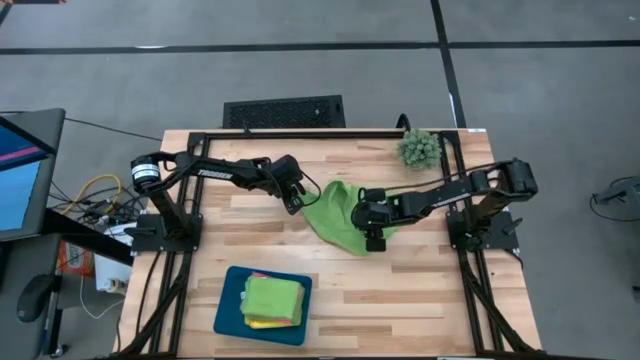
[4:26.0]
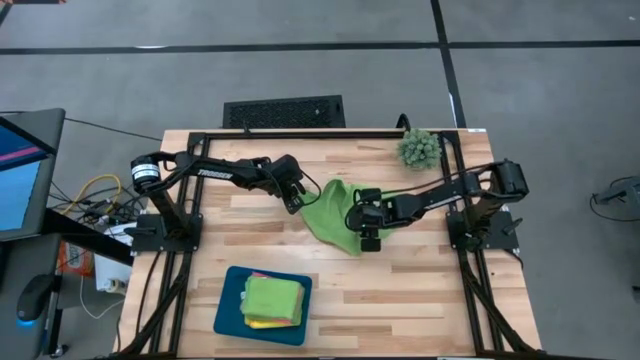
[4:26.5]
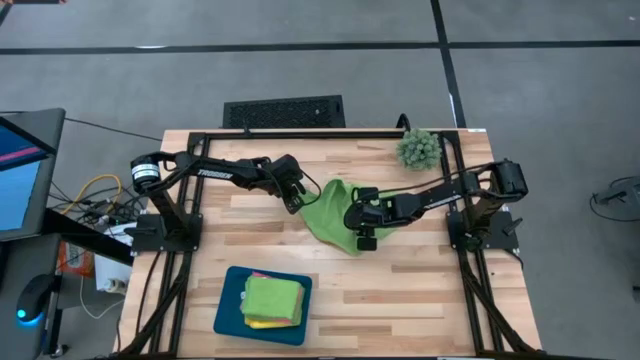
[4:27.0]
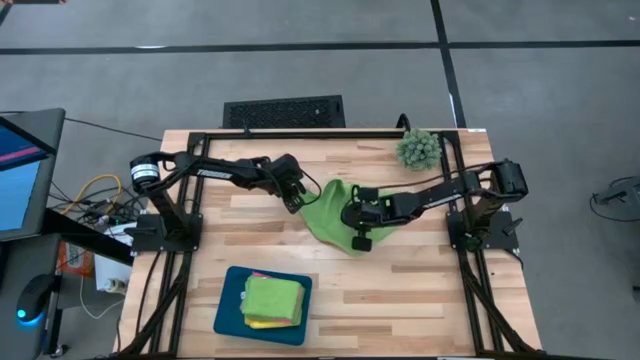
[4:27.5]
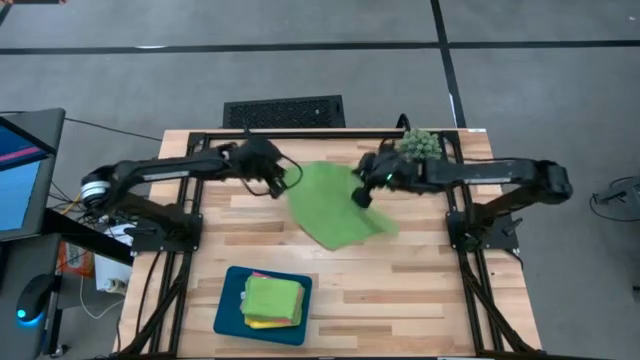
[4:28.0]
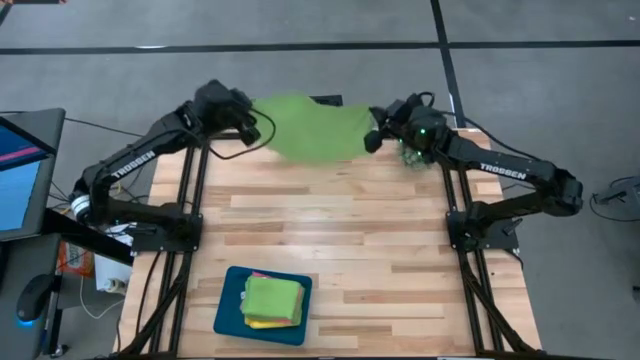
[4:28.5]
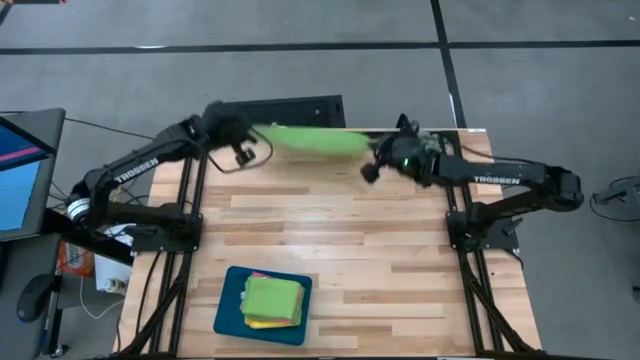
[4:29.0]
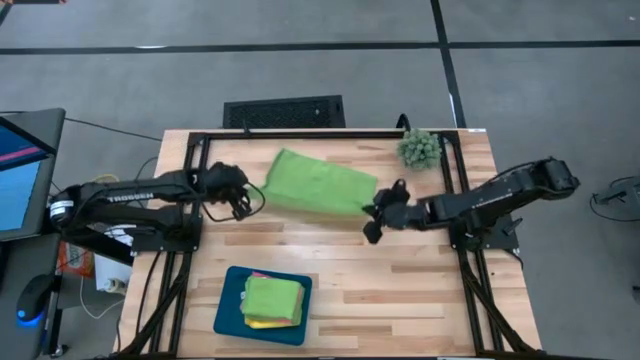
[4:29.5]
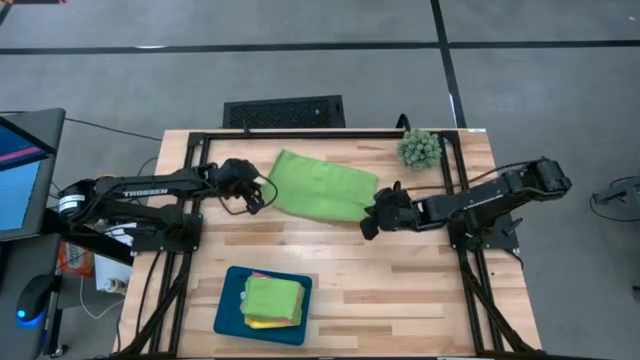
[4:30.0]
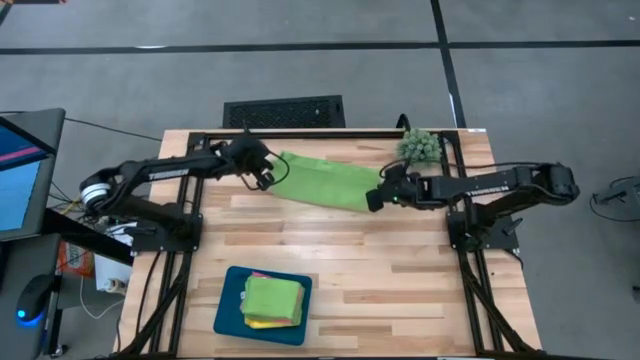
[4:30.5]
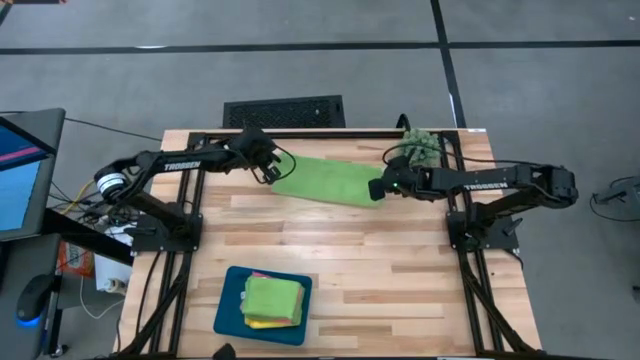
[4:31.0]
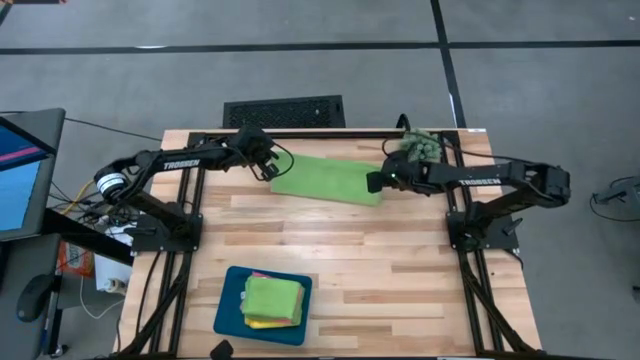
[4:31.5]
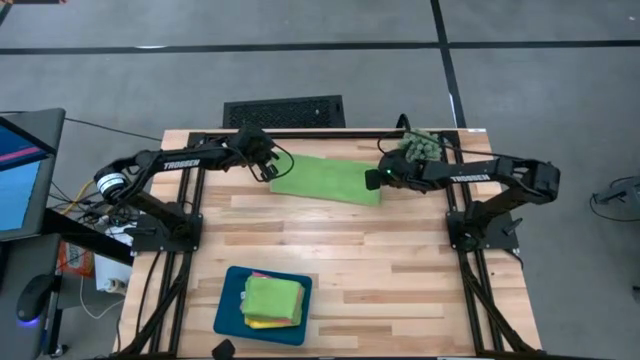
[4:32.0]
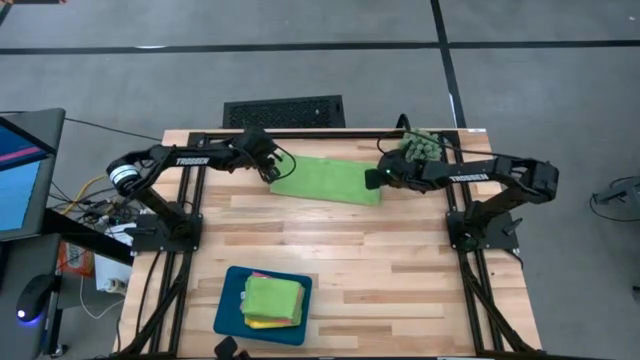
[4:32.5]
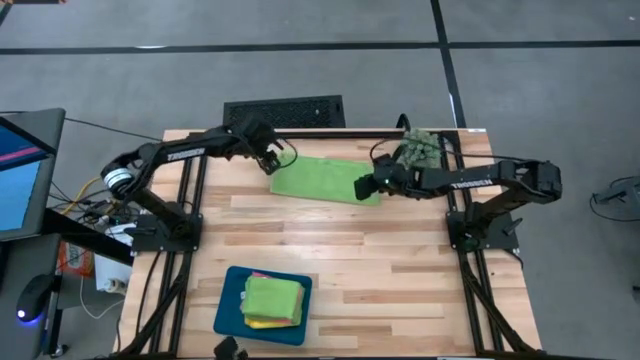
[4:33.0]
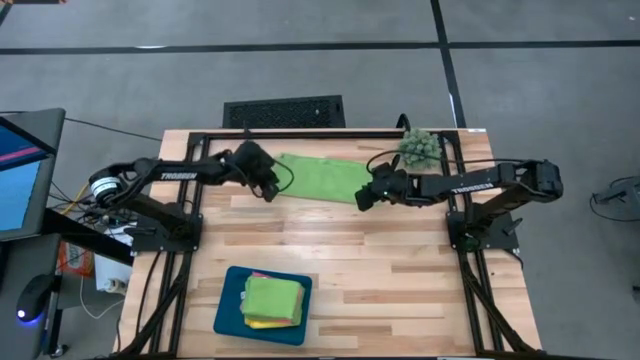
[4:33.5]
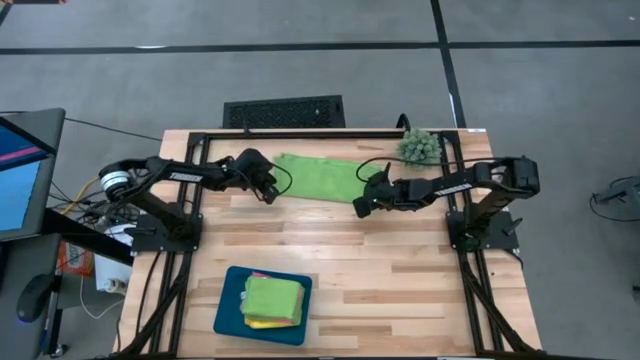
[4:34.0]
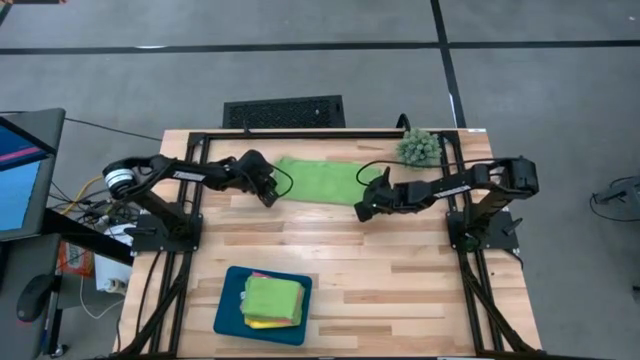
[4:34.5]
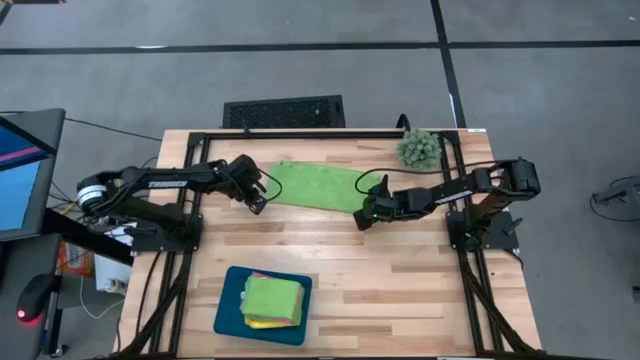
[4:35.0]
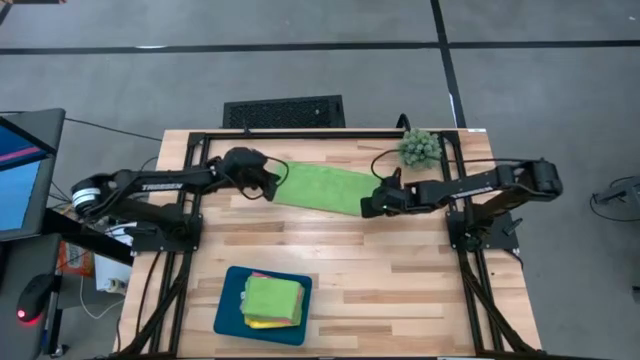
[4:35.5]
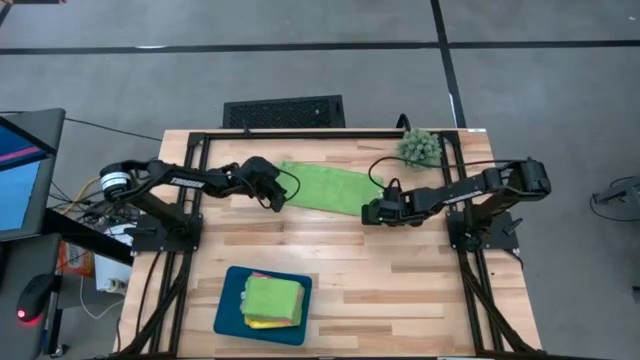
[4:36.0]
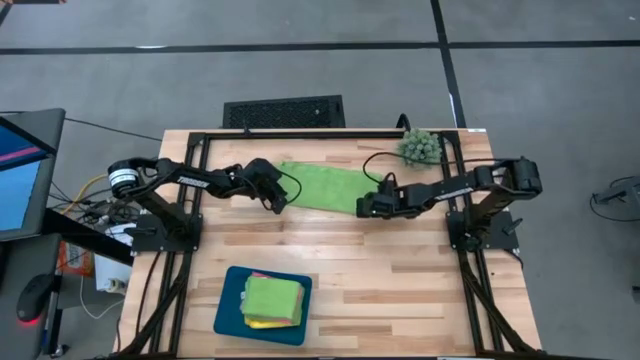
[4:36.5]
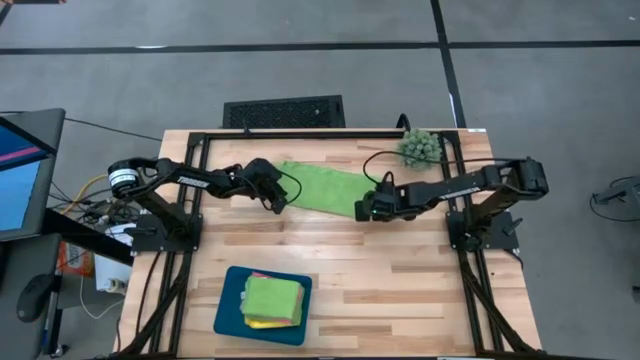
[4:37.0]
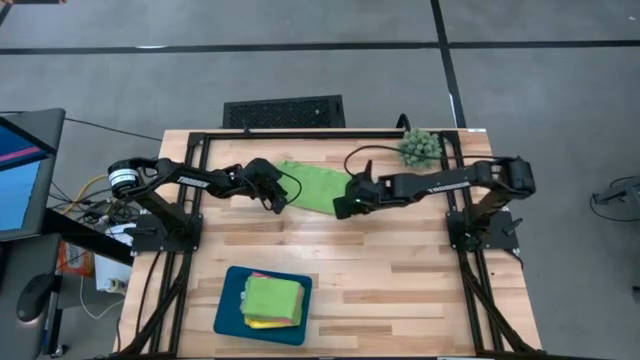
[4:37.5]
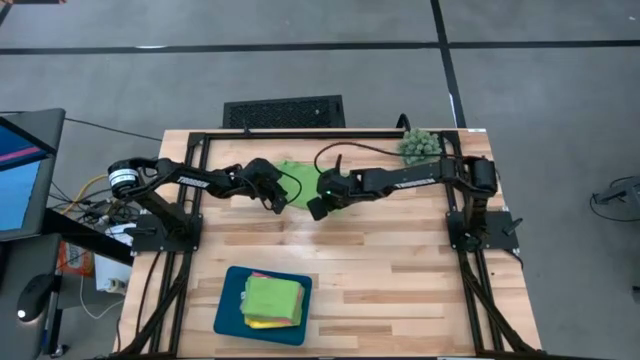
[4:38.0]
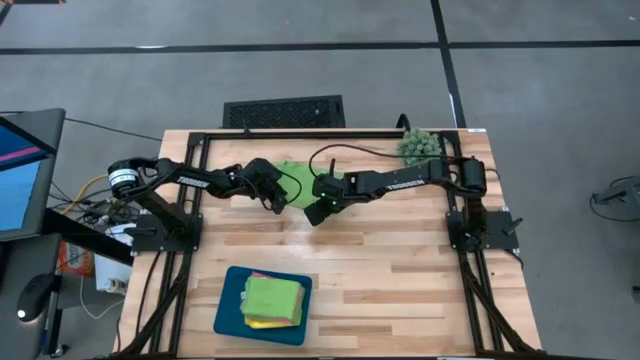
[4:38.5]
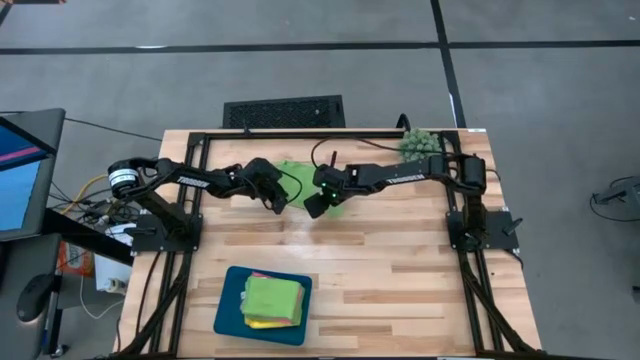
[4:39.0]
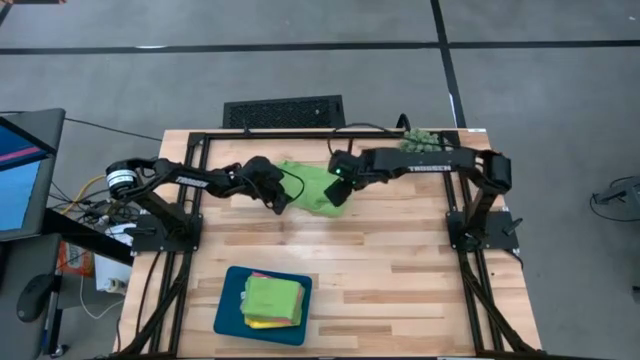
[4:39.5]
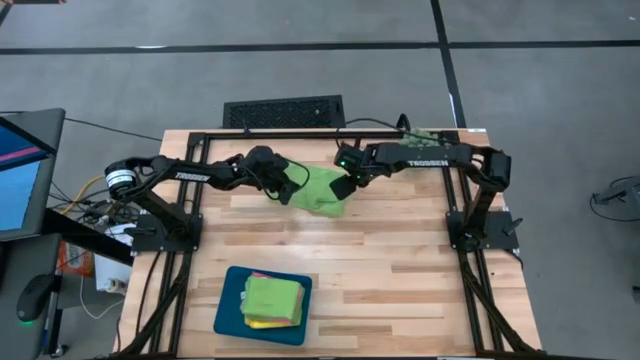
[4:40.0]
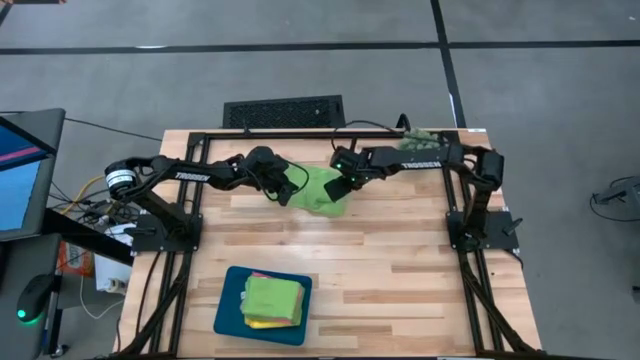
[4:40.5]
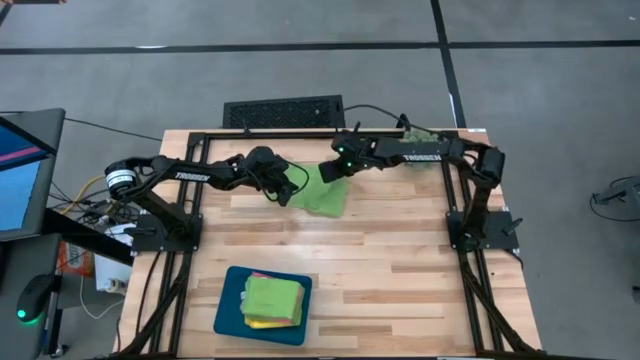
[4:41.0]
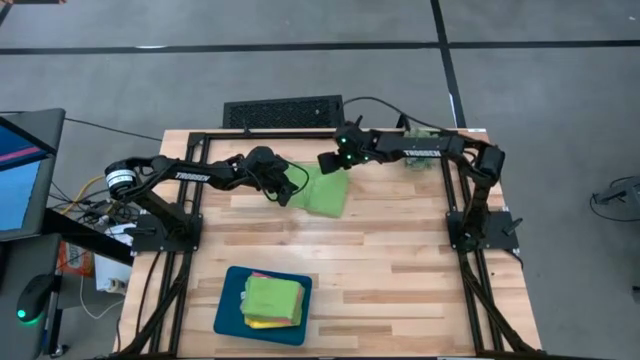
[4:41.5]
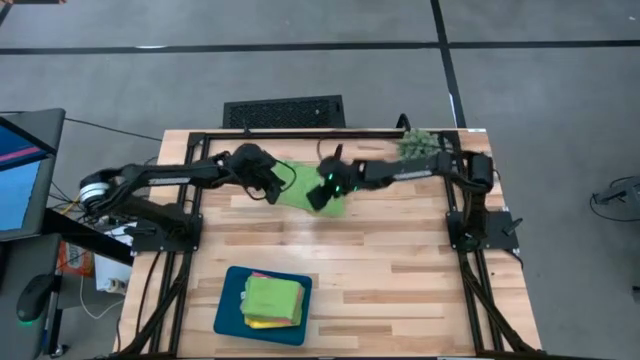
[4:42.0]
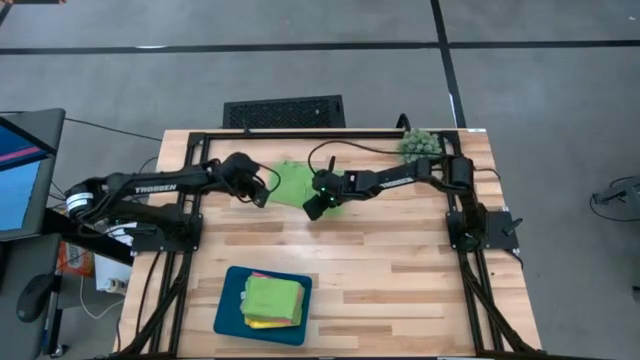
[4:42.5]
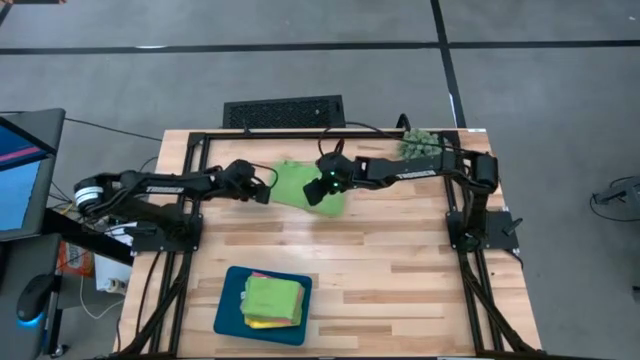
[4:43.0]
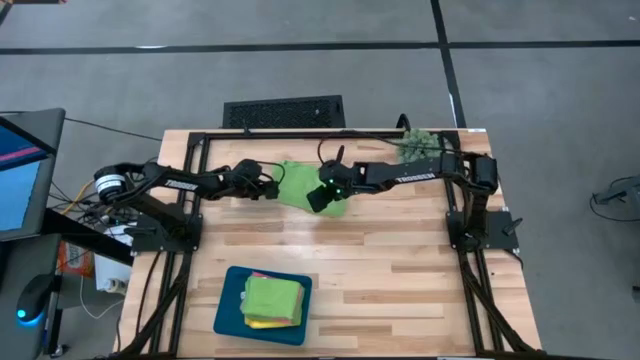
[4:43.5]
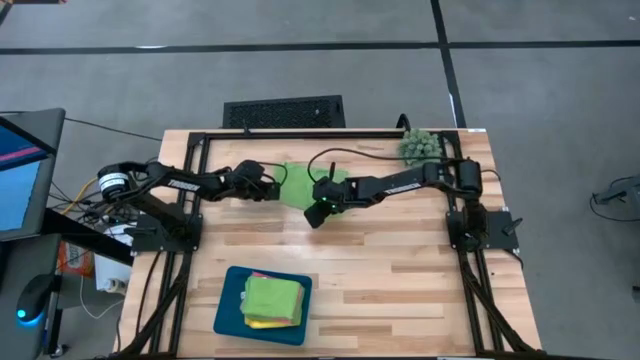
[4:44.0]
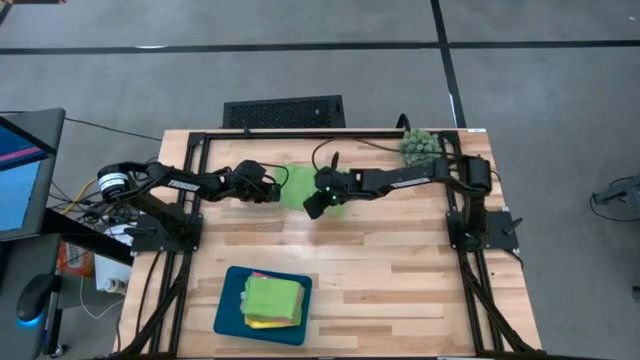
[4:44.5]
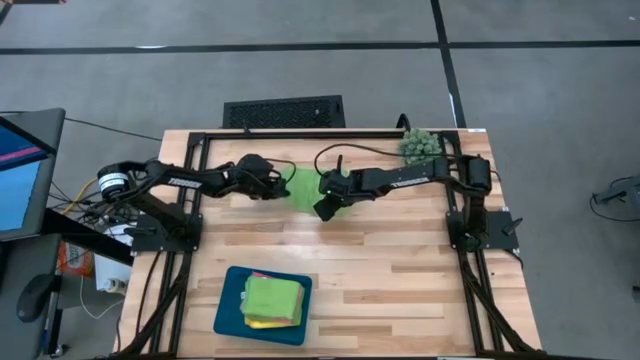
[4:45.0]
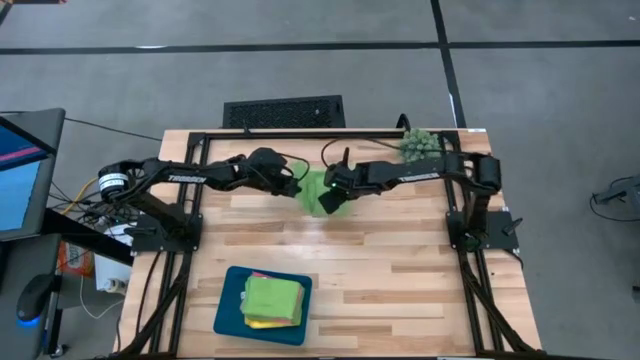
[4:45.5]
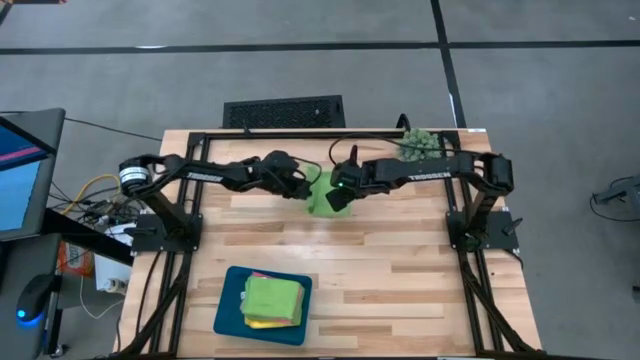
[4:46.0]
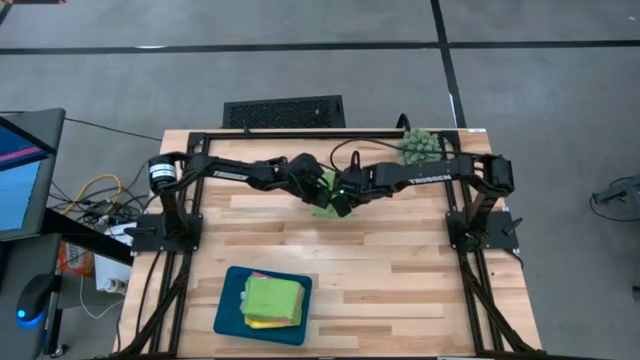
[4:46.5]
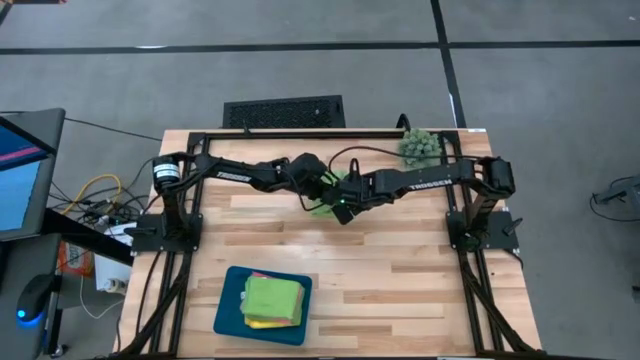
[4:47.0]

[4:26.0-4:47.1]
Task: Fold microfiber towels
Fold the green microfiber towel

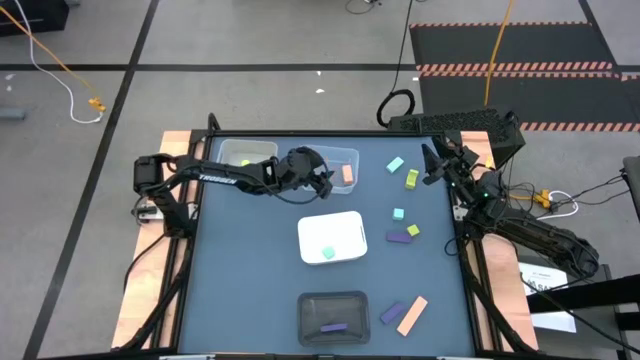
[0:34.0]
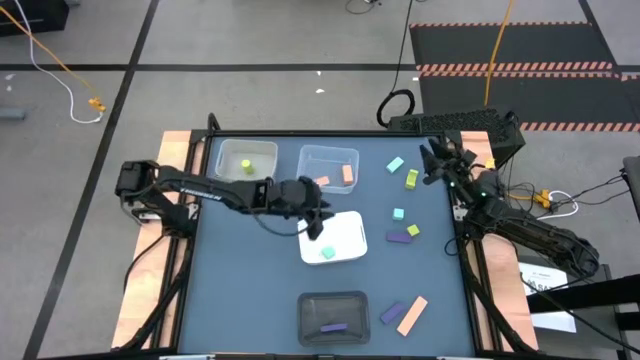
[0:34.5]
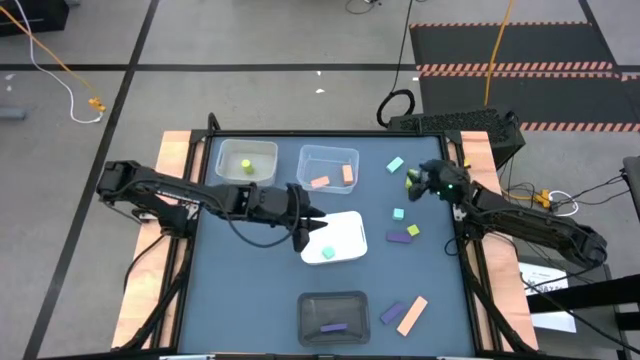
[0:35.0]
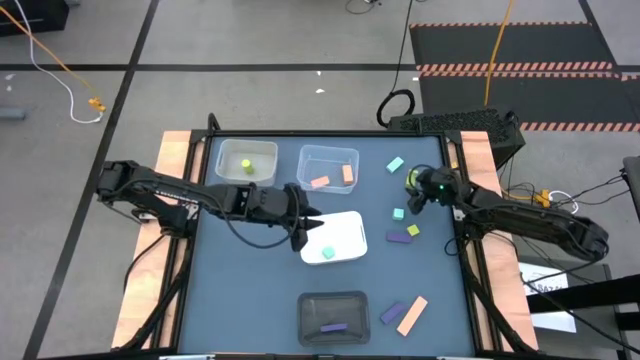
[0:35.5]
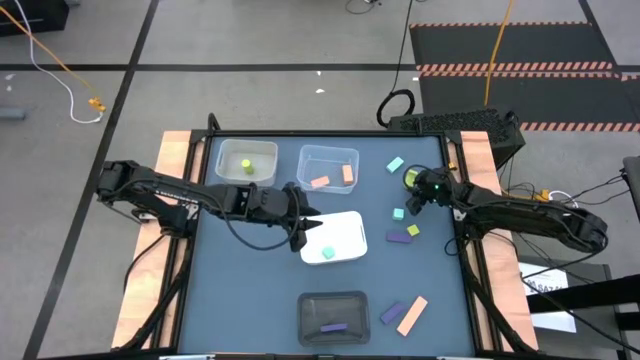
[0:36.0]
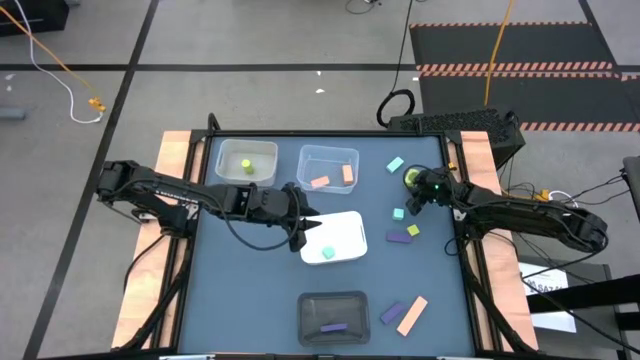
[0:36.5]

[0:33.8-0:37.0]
Task: Sort & place blocks by color
Put the top light green block into the gray bin
